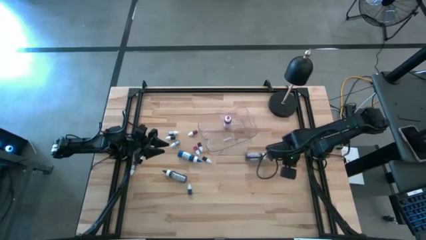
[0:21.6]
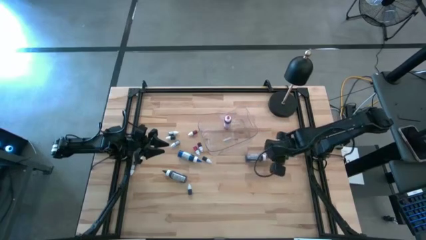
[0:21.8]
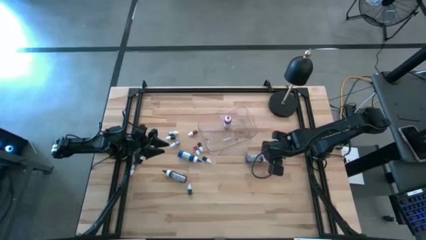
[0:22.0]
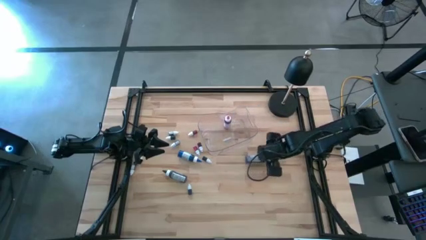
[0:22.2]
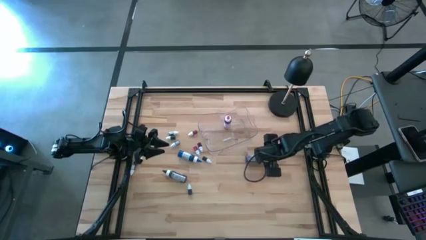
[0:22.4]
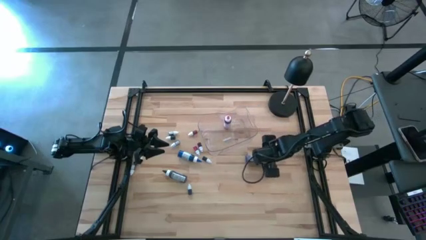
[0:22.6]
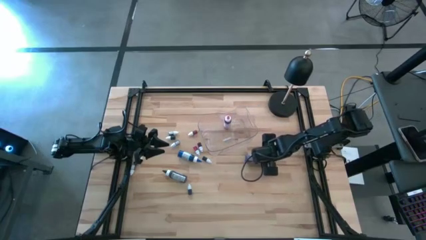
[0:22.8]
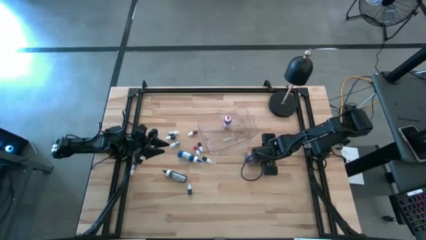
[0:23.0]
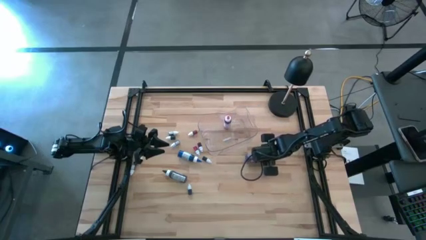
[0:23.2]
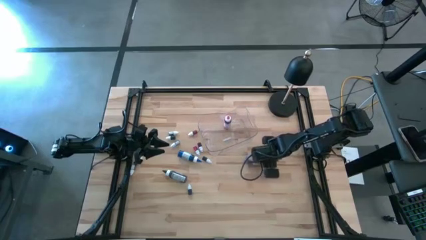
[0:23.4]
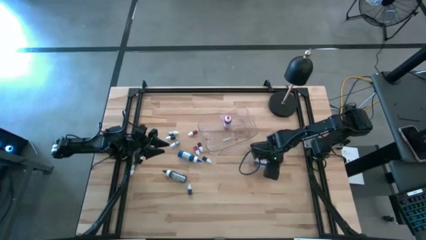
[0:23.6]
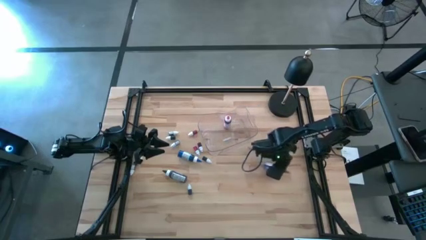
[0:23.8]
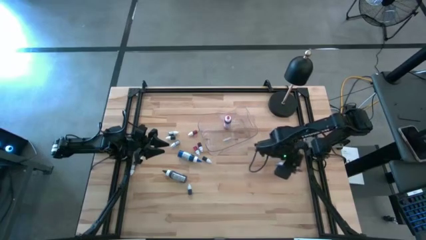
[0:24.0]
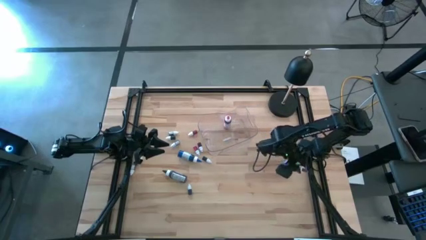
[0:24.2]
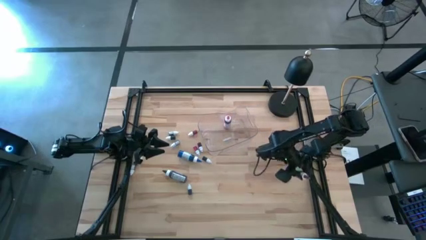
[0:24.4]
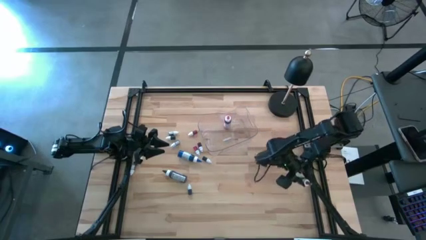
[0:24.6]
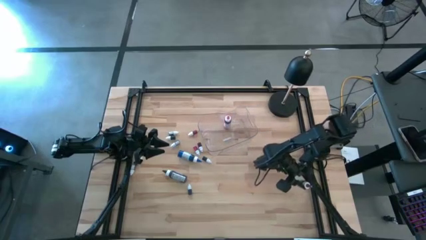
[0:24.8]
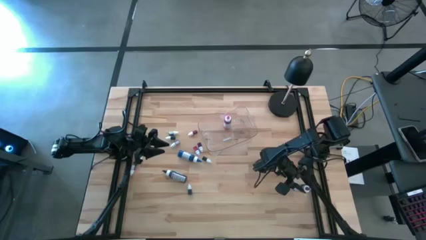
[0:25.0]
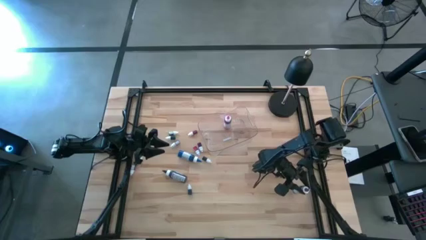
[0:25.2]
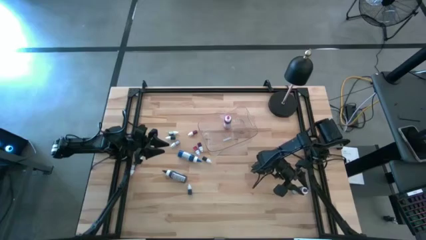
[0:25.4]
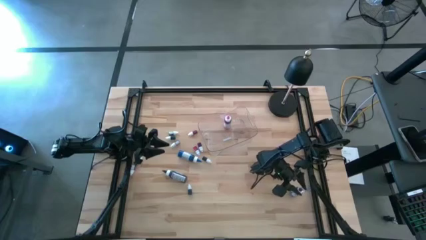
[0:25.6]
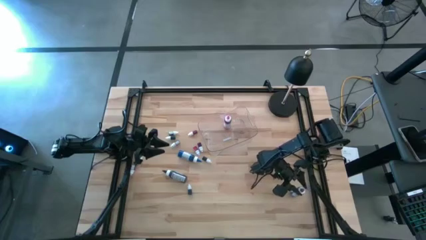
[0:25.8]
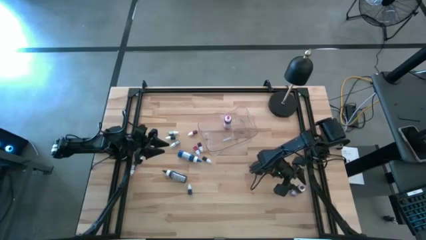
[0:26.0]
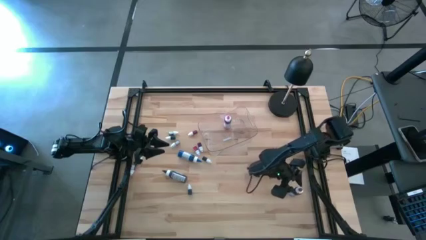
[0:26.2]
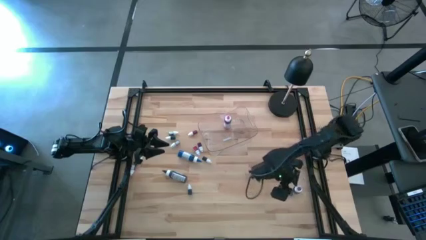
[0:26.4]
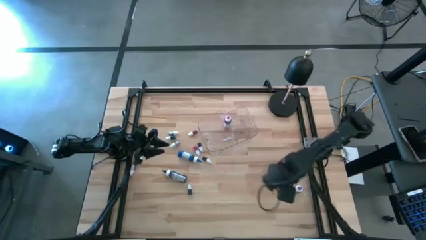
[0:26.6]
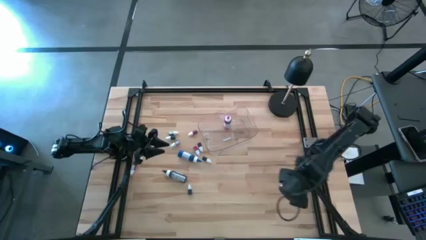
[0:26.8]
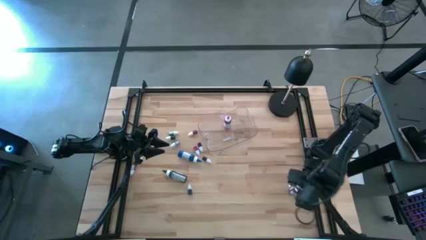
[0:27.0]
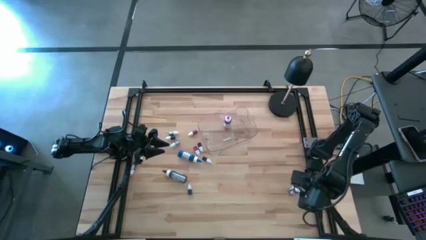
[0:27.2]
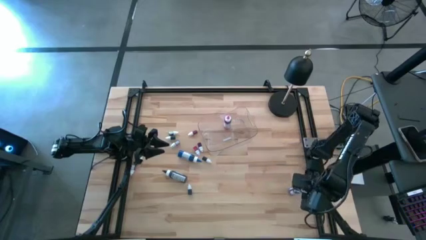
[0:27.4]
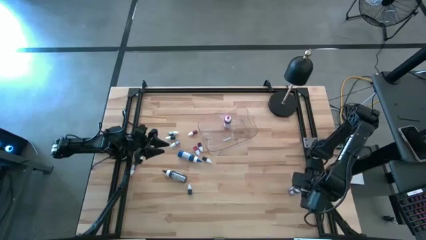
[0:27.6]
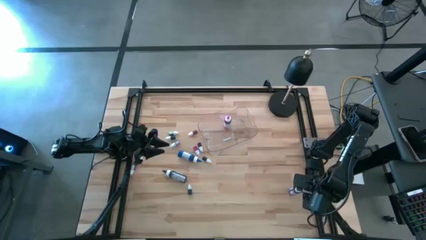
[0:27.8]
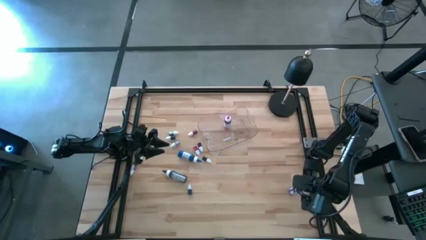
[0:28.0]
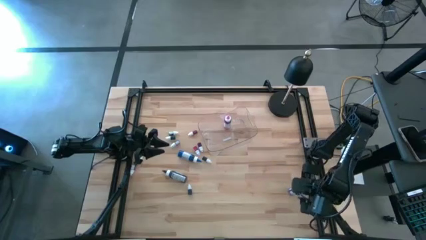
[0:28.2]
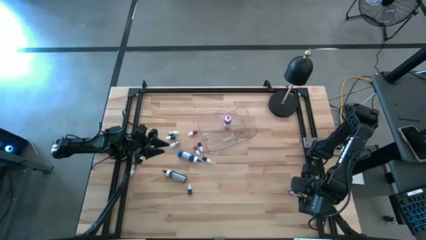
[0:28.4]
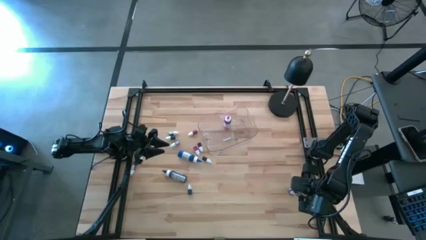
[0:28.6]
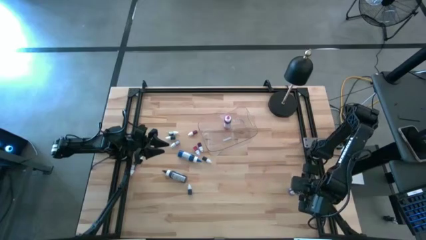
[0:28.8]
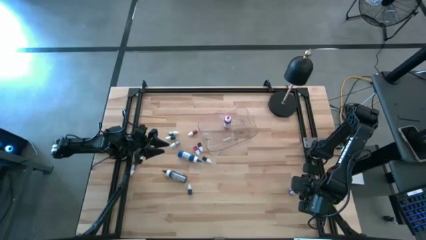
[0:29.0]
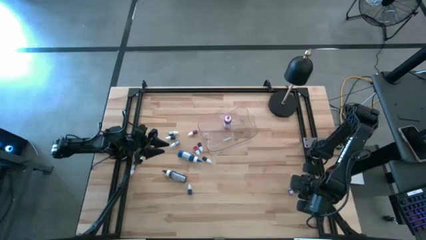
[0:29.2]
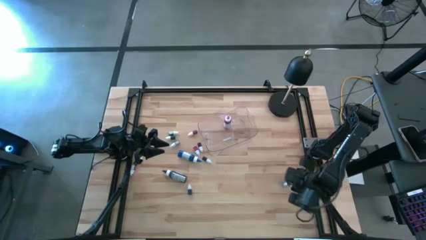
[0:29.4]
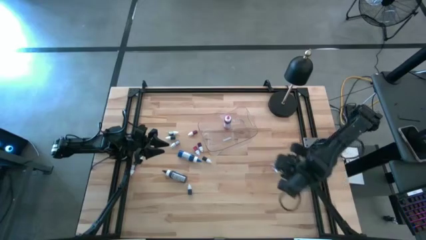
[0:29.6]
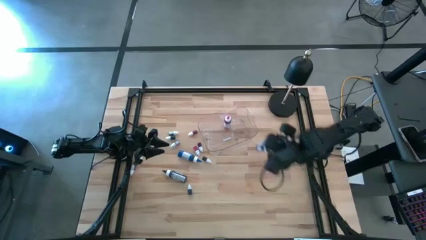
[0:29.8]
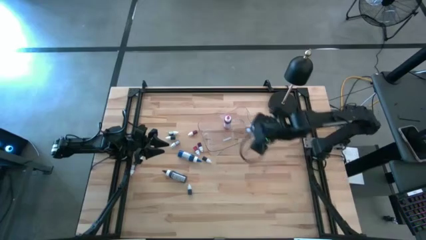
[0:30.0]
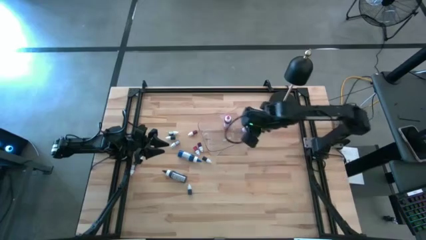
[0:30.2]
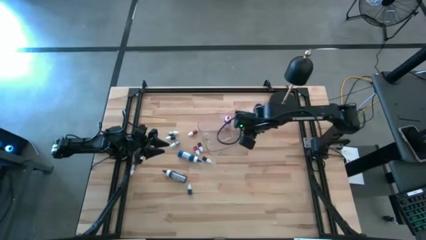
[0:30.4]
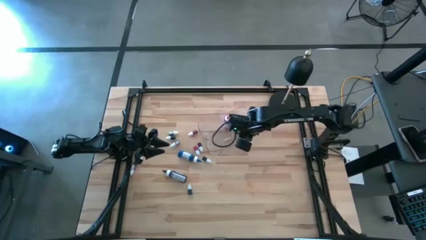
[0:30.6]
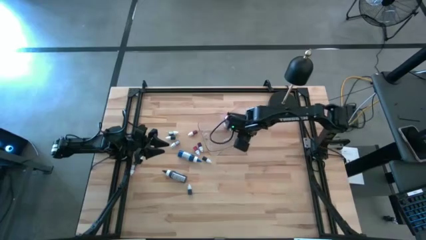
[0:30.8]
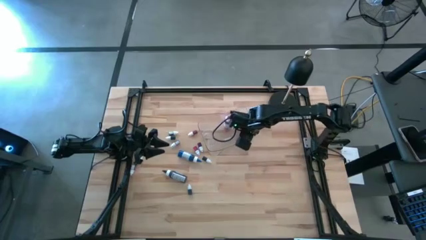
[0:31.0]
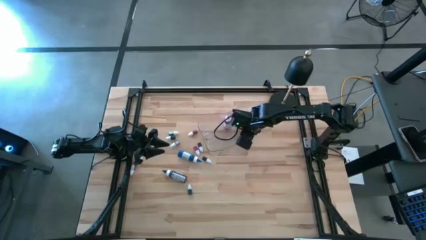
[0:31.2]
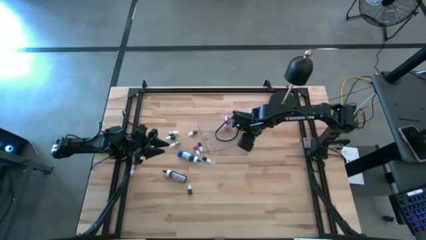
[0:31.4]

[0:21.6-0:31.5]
Task: Pick & Place food coloring
Put the large purple food coloring bottle into the transparent container

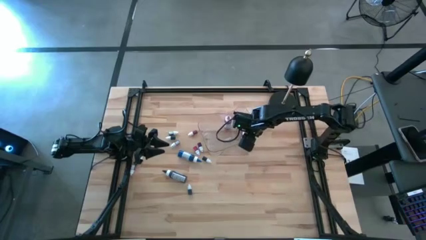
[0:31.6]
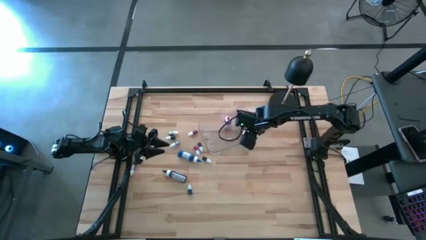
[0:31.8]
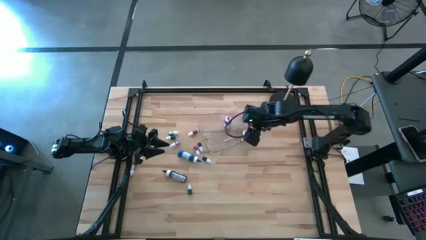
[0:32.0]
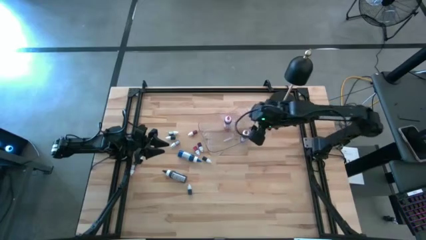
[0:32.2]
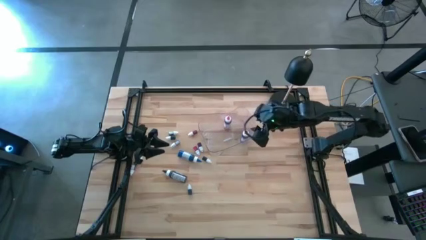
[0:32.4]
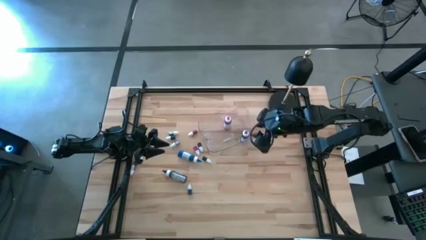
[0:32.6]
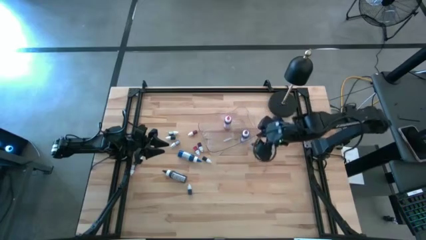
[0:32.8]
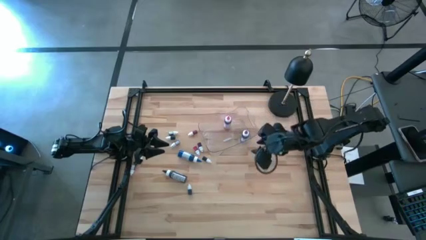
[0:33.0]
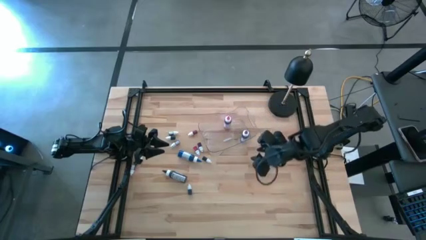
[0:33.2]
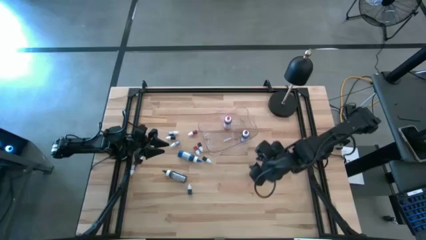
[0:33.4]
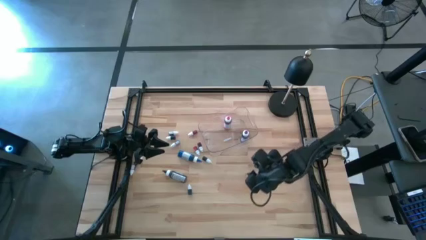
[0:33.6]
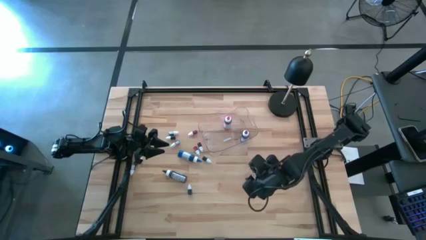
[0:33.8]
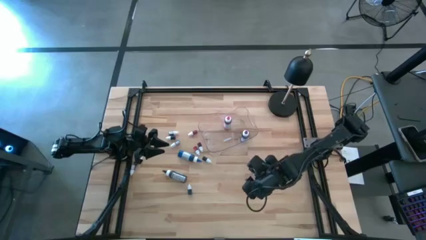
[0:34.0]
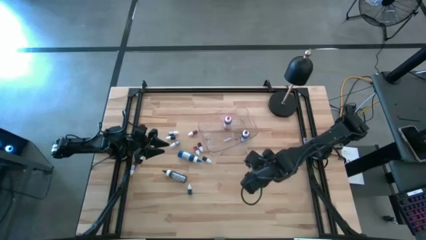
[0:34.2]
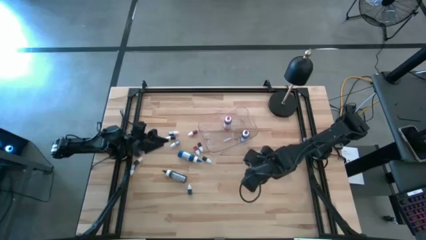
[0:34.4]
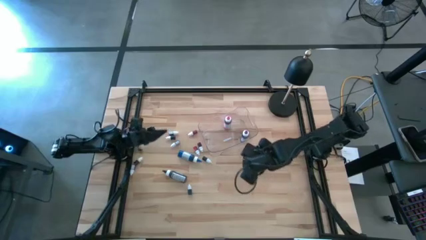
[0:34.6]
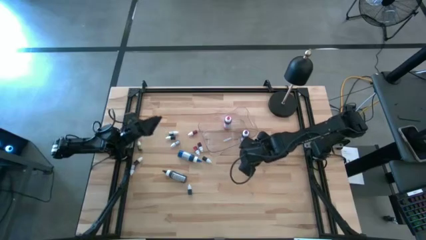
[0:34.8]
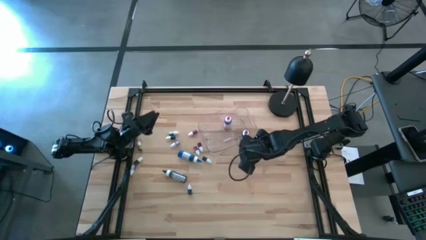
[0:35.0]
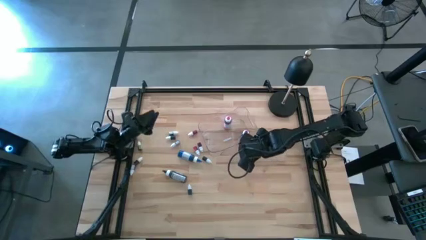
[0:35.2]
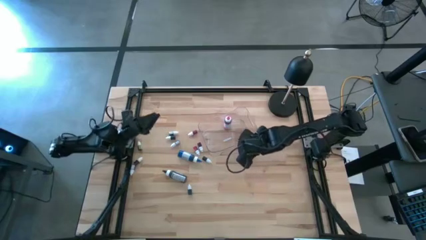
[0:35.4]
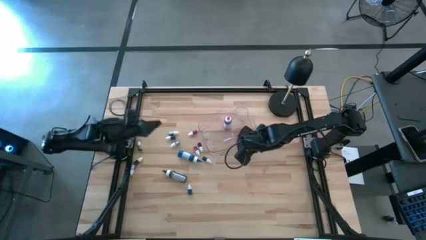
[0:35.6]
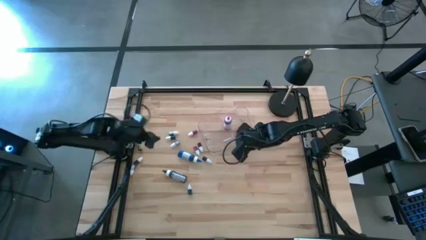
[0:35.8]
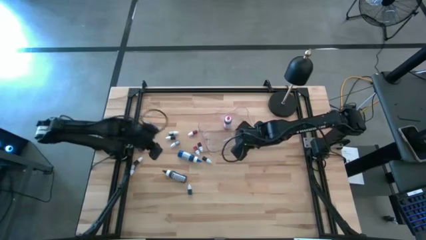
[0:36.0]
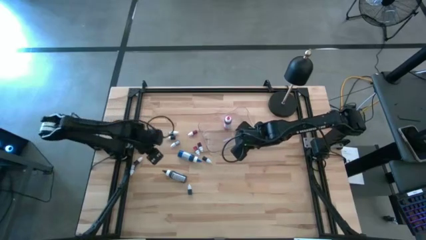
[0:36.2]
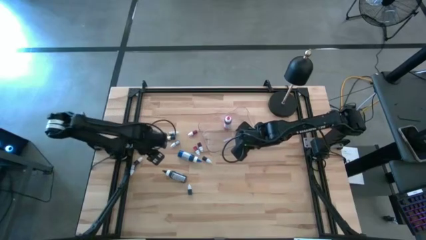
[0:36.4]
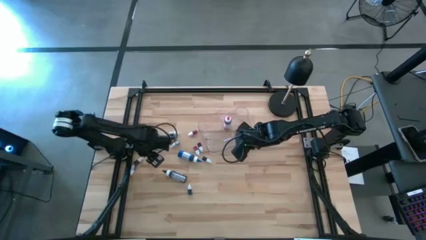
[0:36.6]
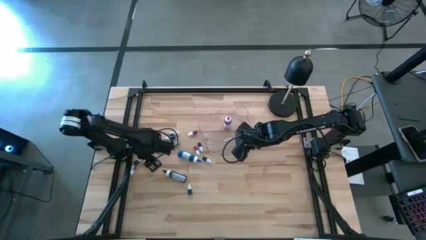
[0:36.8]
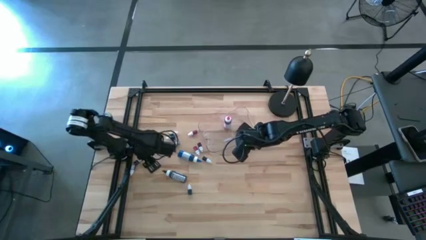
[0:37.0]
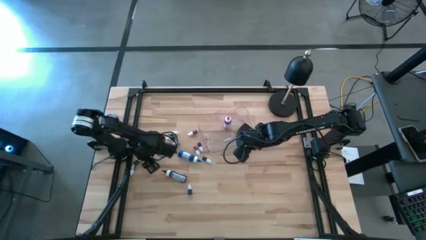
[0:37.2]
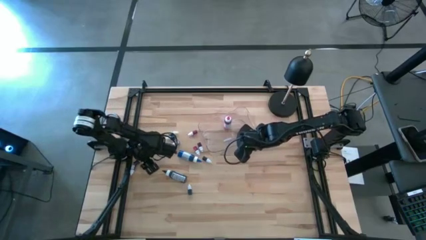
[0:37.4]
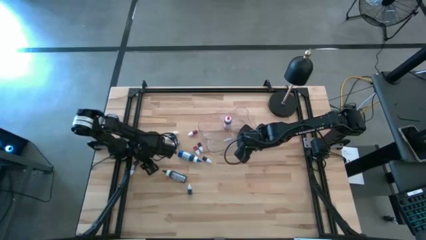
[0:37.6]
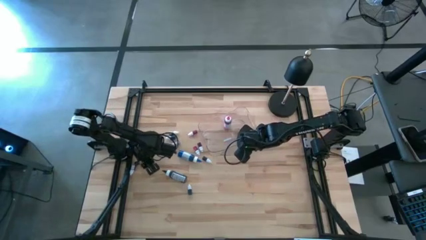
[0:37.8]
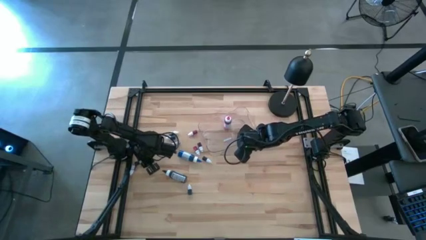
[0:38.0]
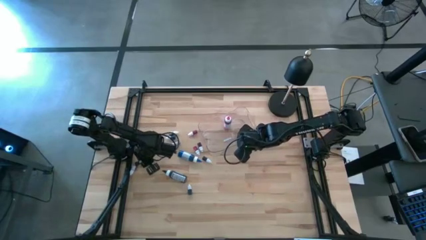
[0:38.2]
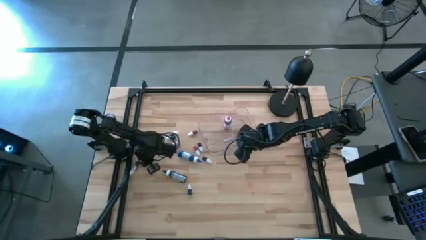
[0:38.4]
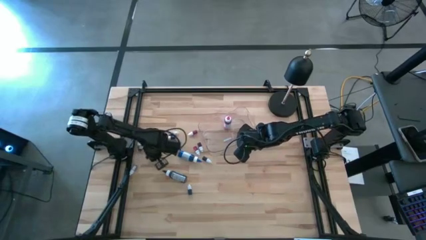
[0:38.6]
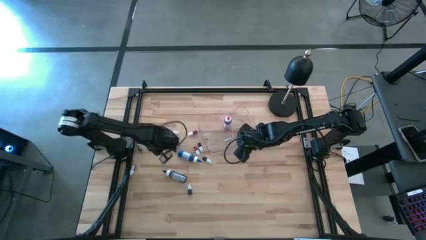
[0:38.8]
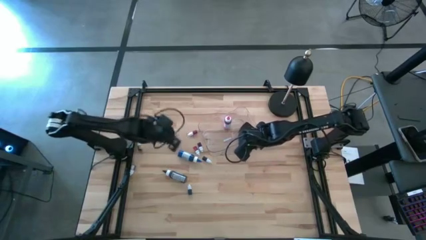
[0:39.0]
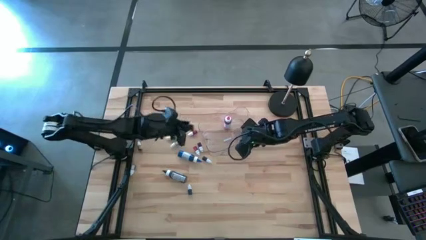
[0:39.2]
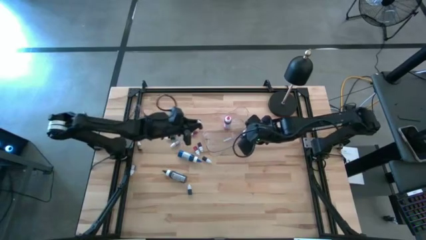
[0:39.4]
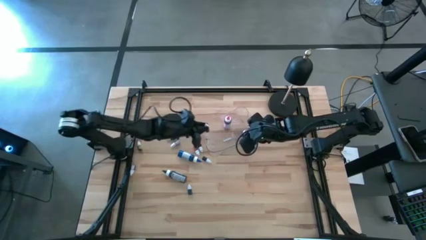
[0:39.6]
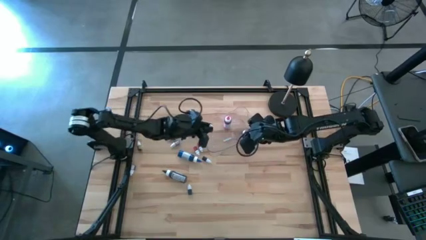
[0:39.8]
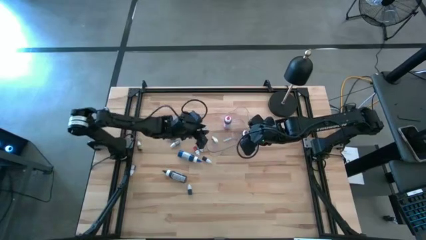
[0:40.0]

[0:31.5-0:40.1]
Put the small brown food coloring bottle into the transparent container
